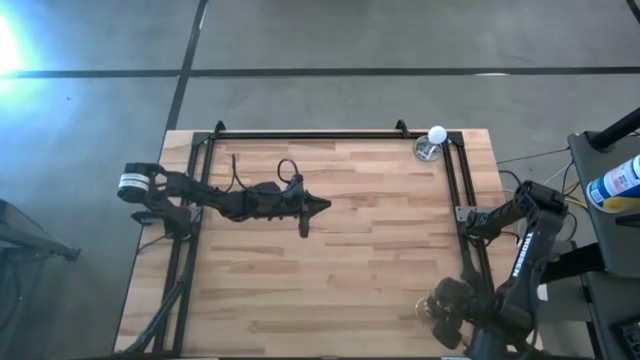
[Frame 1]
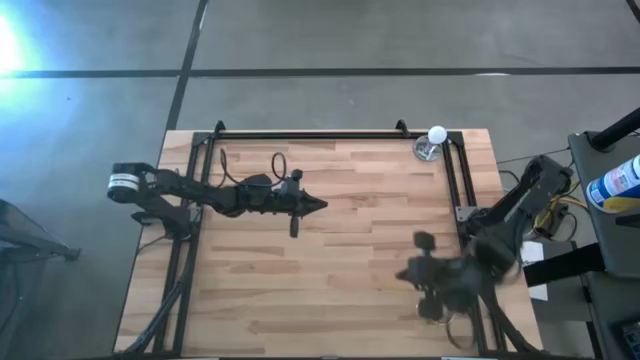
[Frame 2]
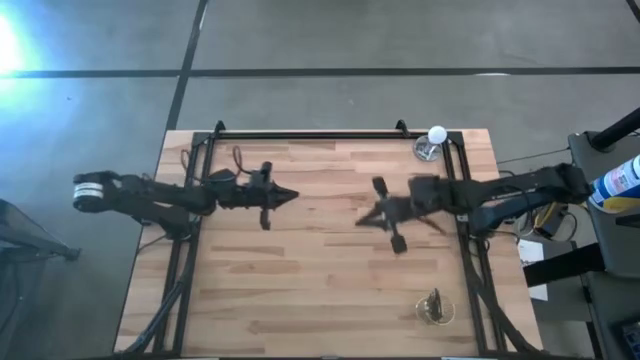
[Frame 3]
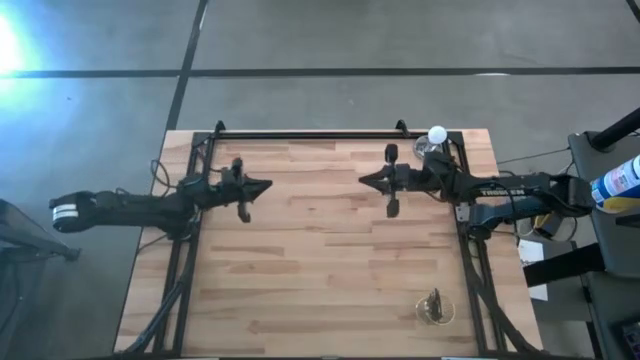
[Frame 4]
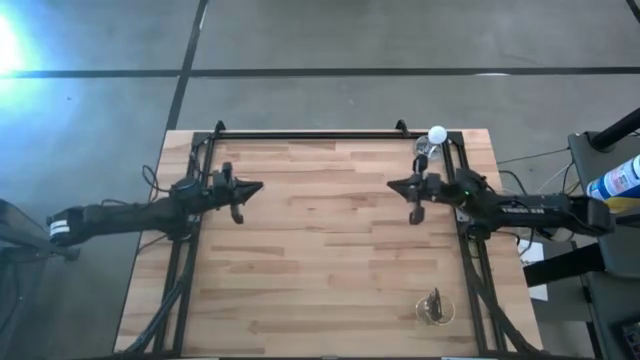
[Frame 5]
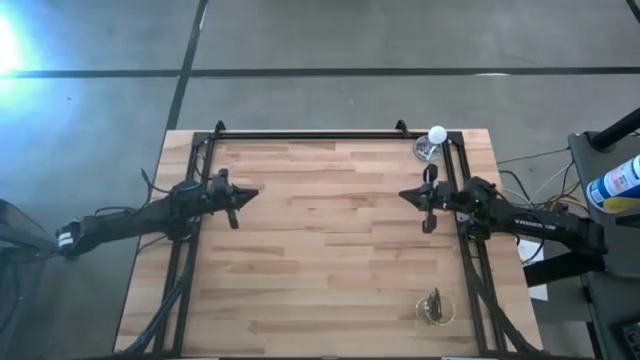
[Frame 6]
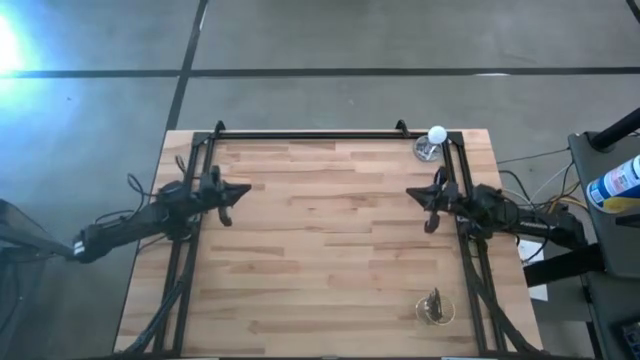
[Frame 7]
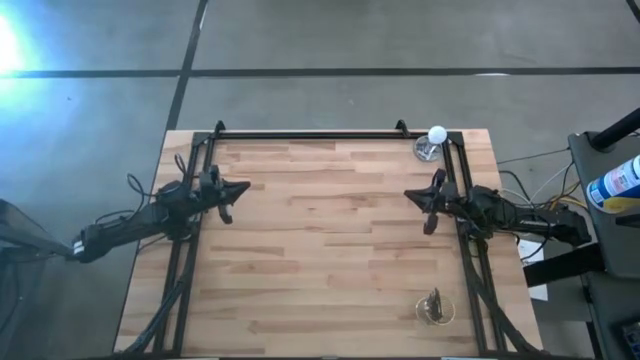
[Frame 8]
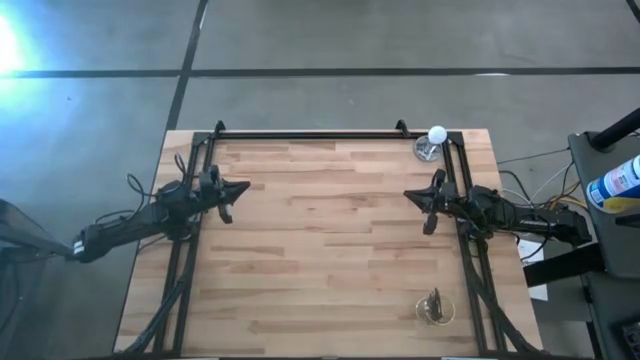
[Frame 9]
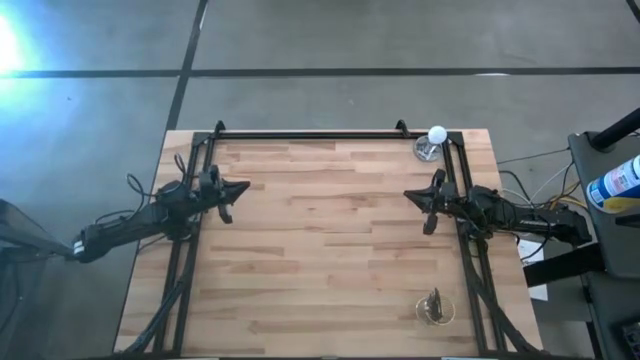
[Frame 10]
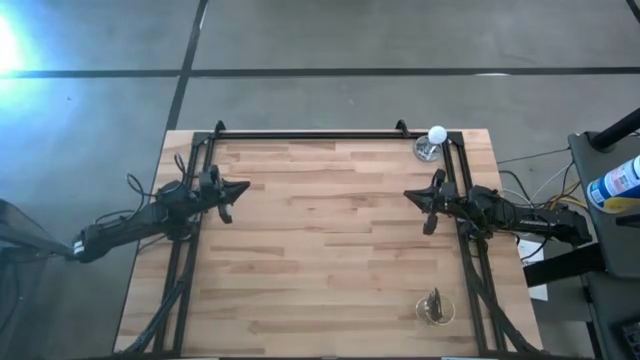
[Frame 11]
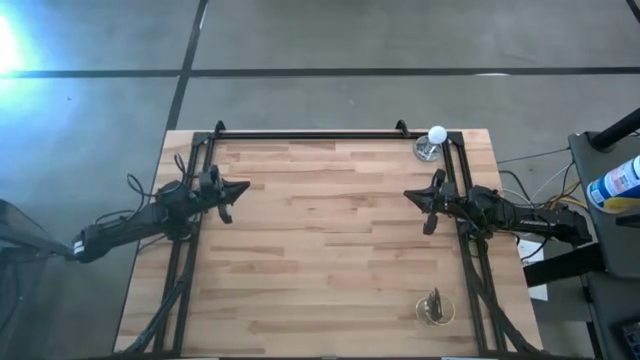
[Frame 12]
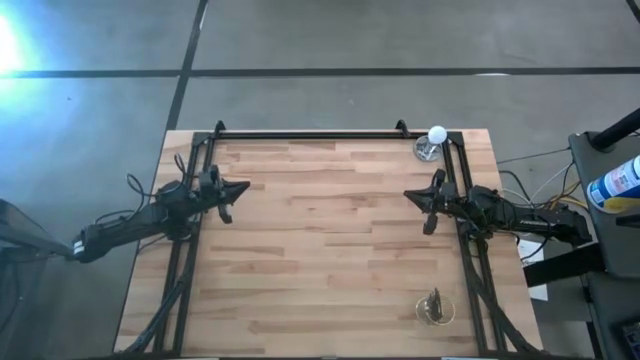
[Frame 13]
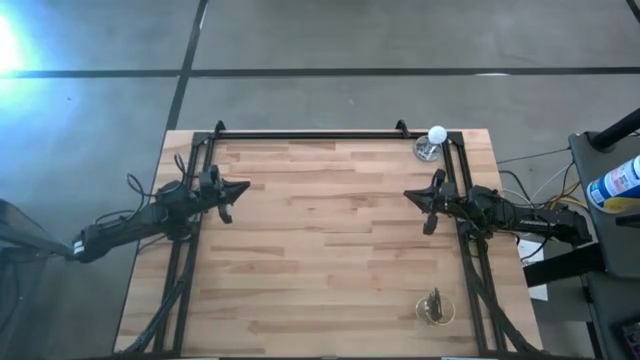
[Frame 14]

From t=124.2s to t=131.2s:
Task: Pick & Place Makeup Brushes
Return to Home Position

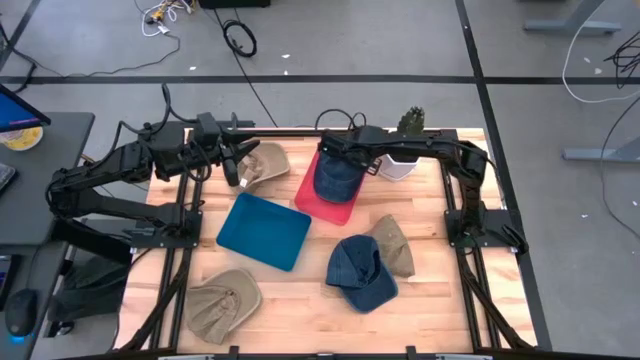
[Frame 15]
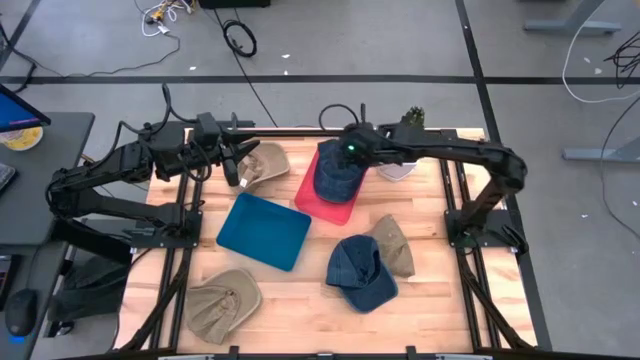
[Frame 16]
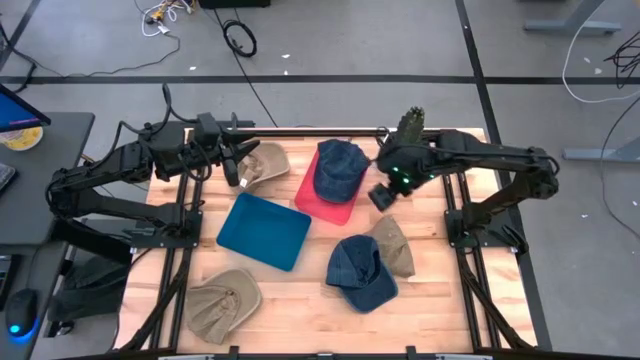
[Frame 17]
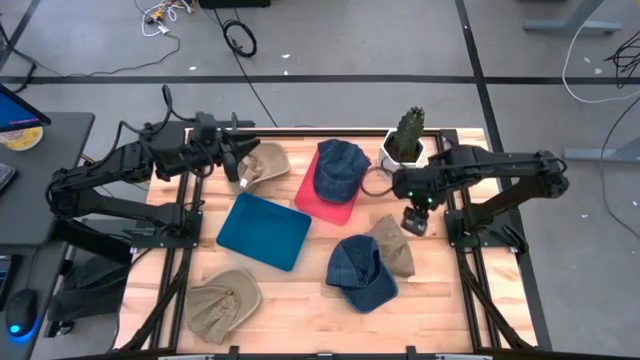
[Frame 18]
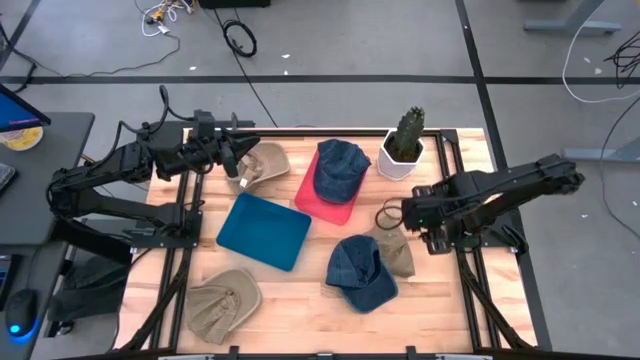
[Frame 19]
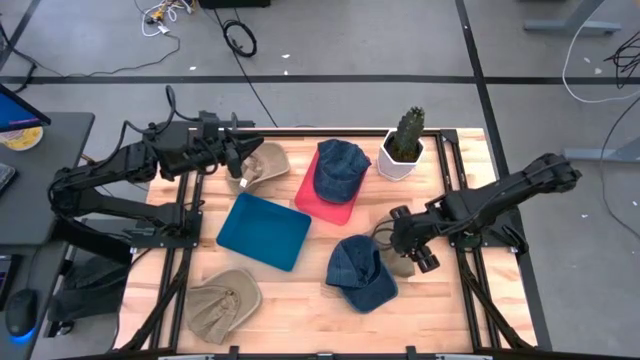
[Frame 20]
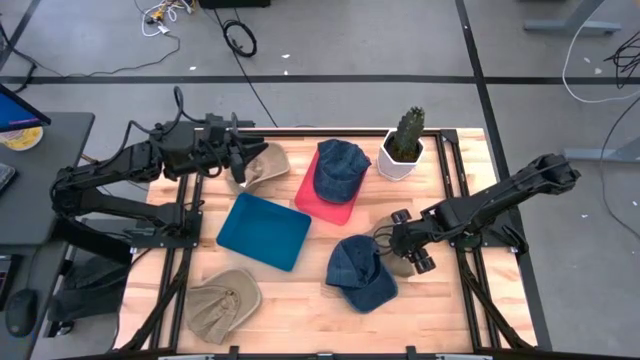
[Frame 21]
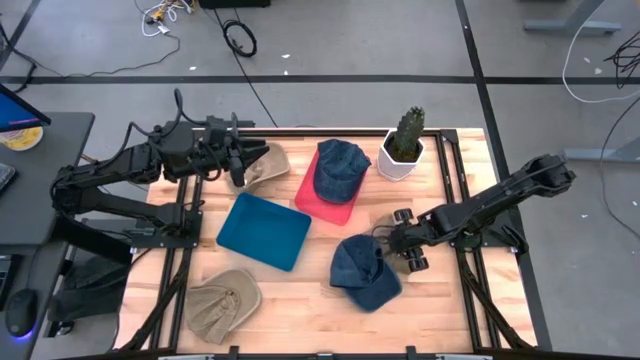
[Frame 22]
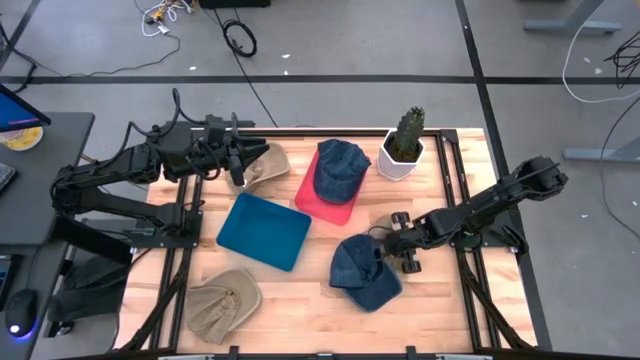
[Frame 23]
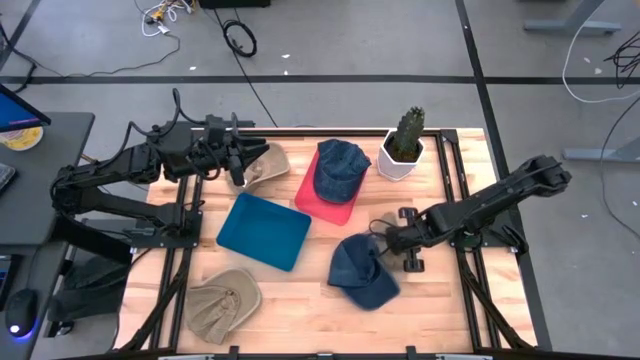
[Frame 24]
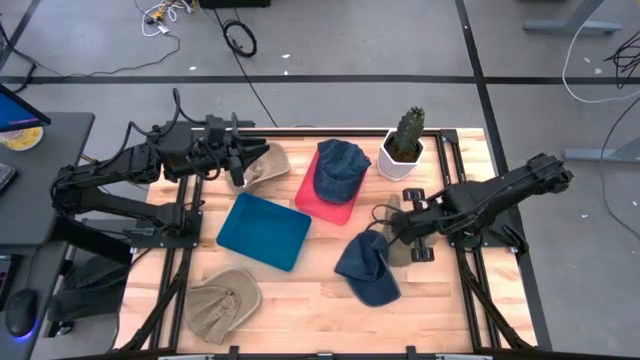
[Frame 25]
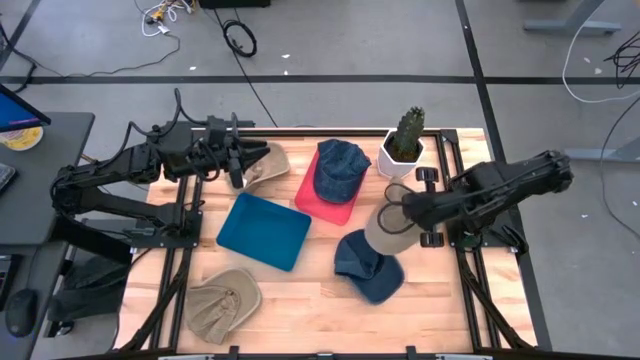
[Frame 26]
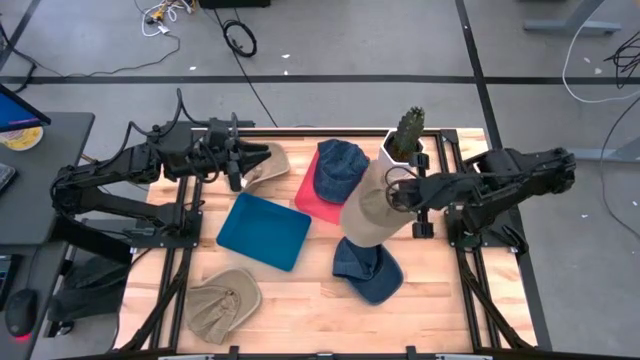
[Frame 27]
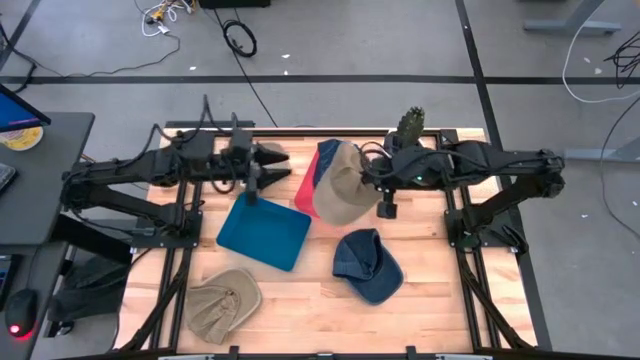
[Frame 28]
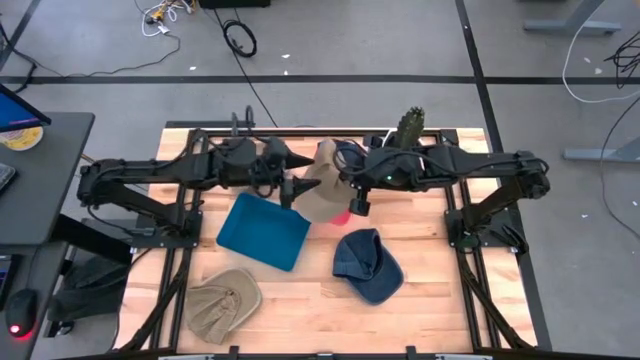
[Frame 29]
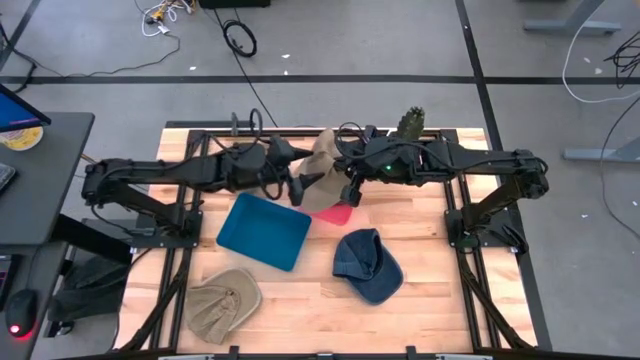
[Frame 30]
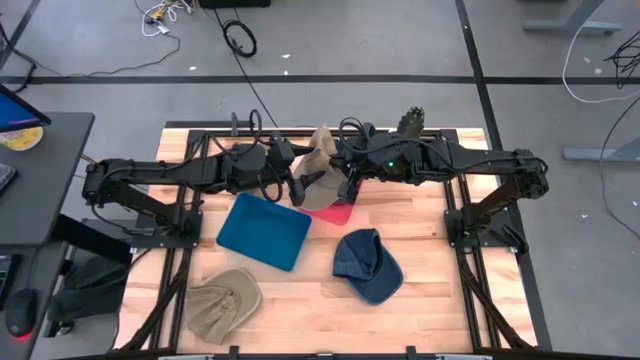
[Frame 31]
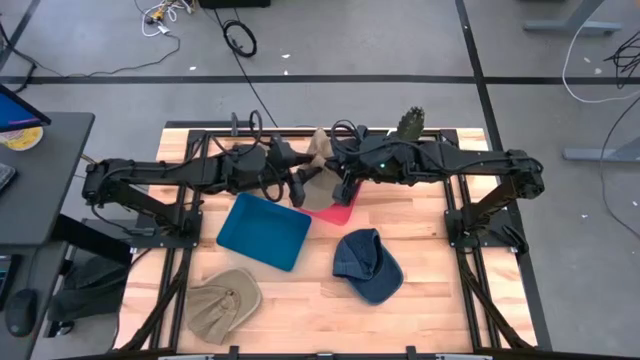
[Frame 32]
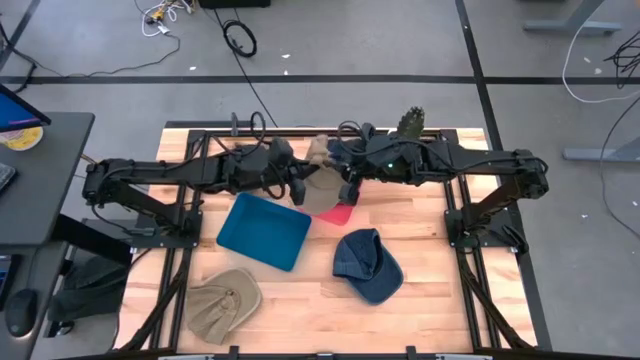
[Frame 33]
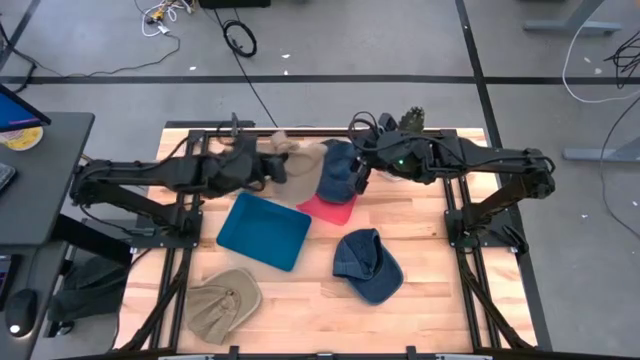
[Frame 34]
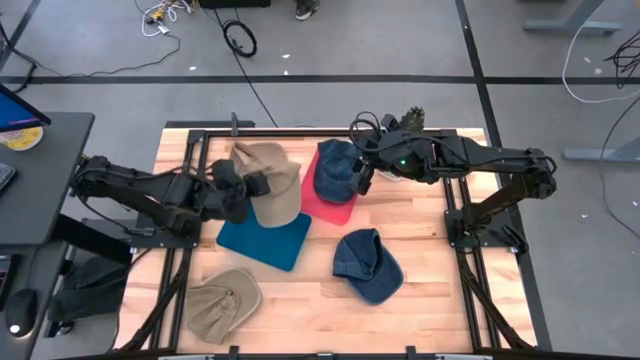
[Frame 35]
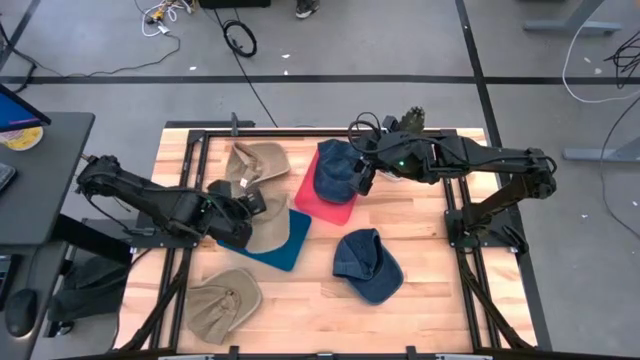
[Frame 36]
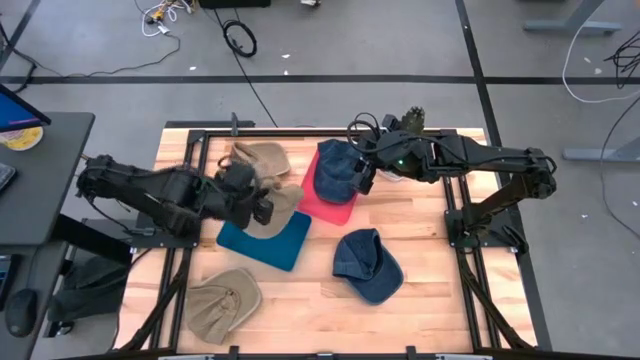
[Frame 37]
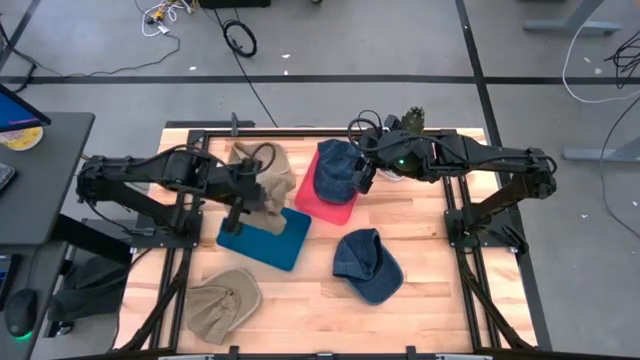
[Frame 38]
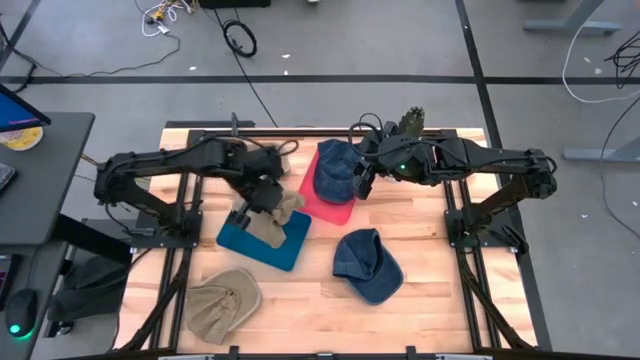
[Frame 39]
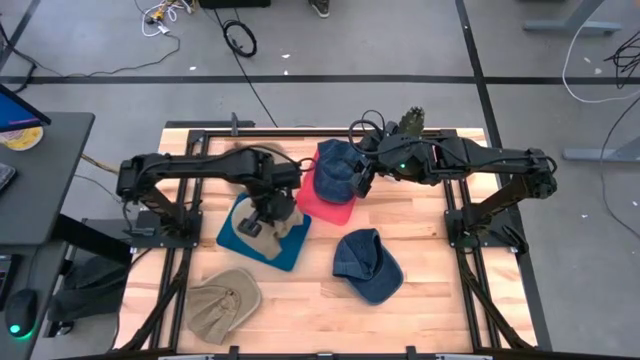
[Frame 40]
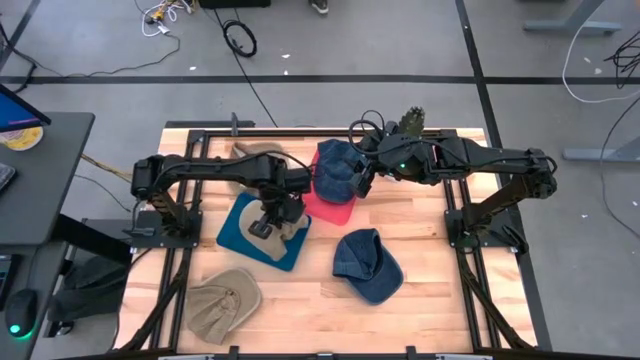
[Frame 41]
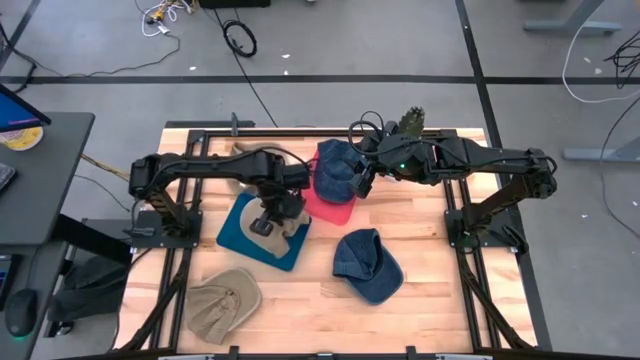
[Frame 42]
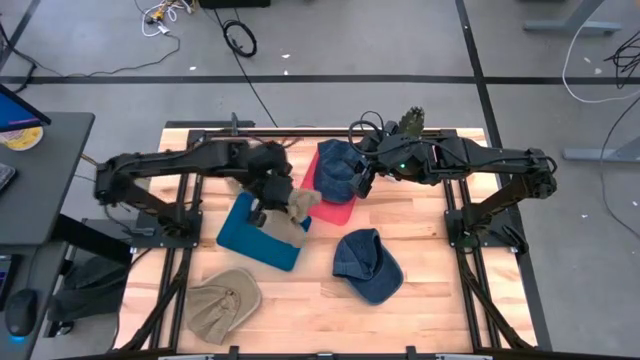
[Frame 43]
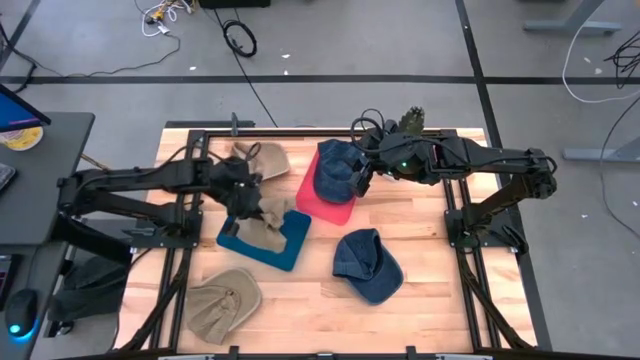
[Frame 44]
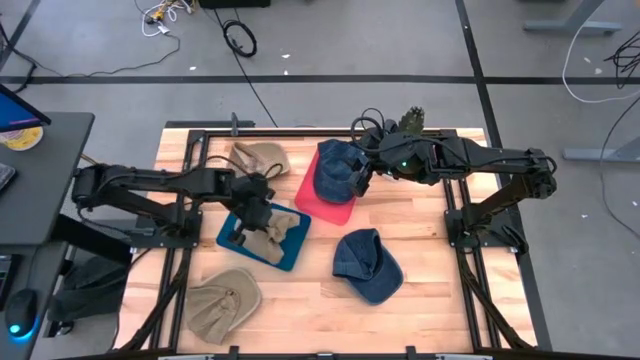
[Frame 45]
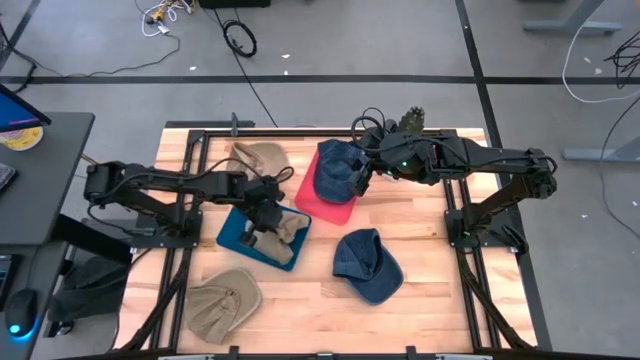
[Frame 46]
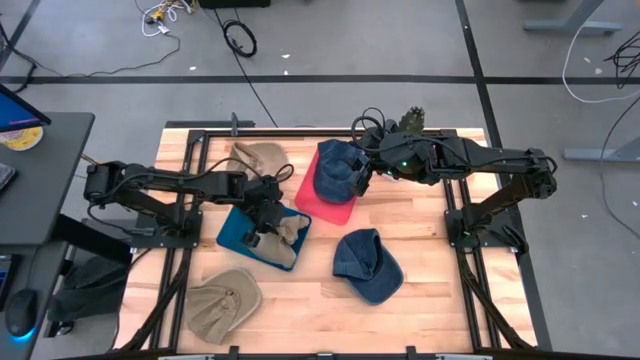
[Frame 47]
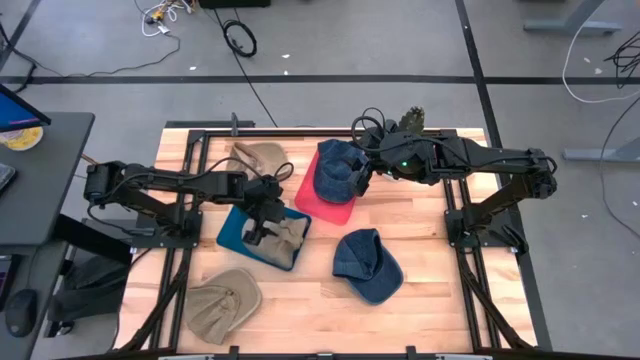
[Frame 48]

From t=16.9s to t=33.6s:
Task: Pick & Place hat
Put the right brown cap into the blue bin
